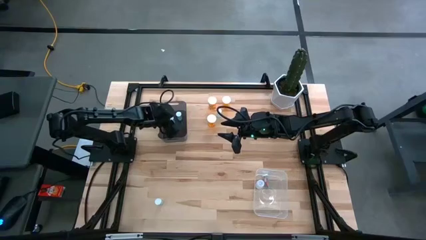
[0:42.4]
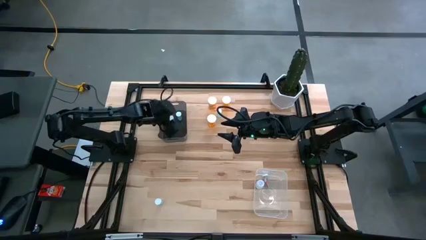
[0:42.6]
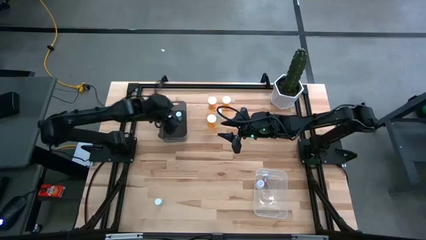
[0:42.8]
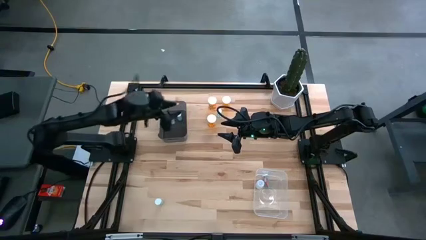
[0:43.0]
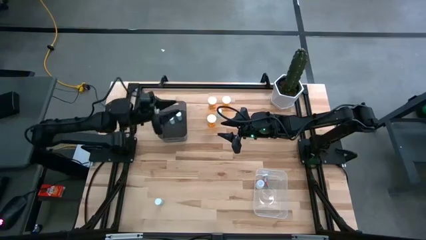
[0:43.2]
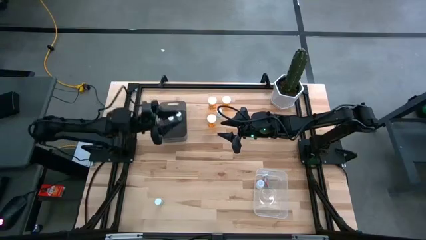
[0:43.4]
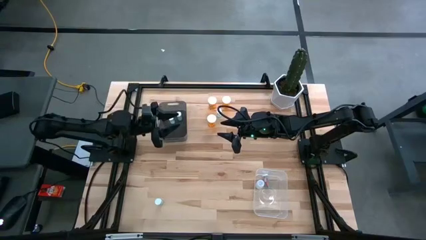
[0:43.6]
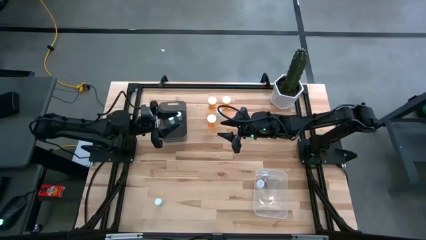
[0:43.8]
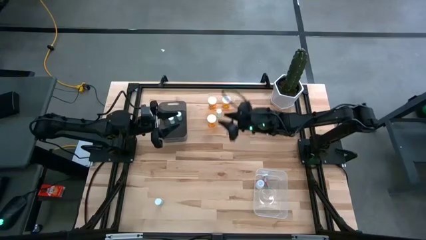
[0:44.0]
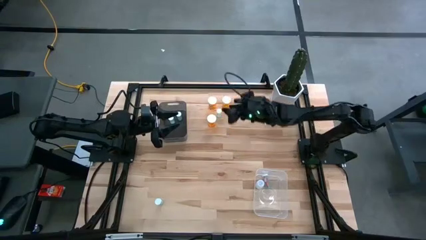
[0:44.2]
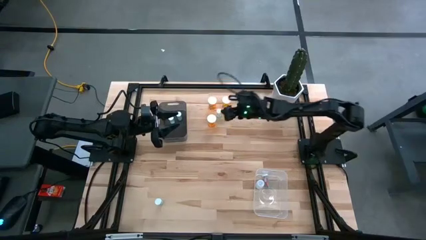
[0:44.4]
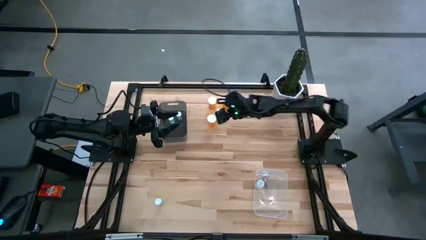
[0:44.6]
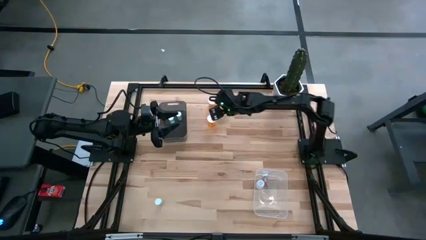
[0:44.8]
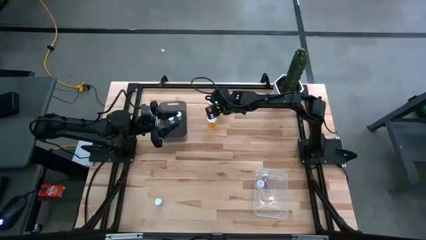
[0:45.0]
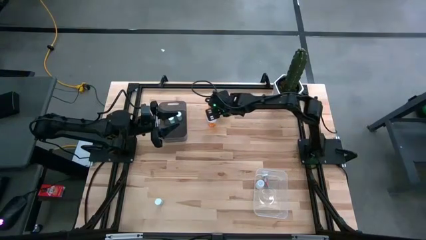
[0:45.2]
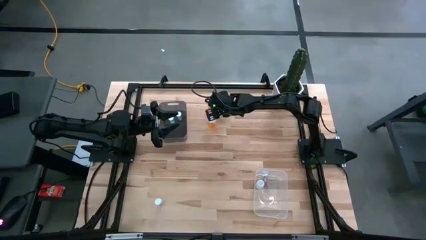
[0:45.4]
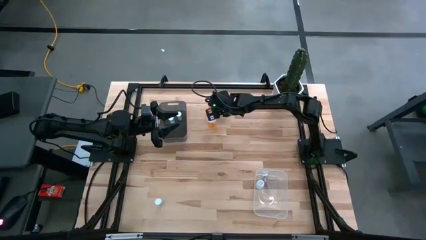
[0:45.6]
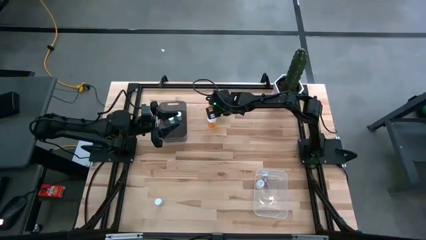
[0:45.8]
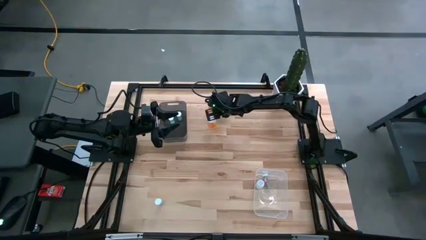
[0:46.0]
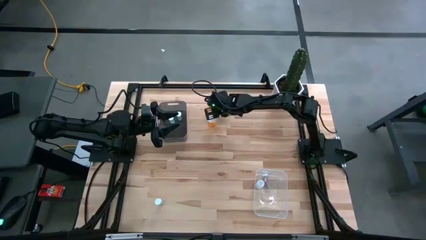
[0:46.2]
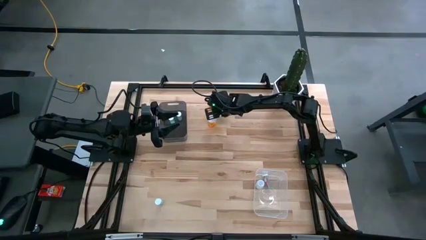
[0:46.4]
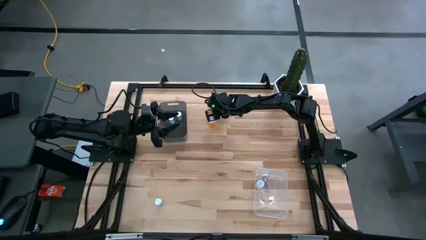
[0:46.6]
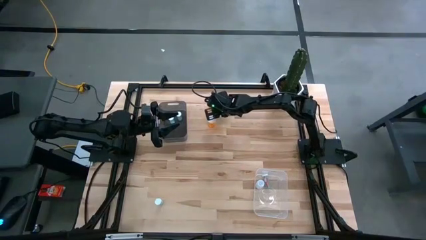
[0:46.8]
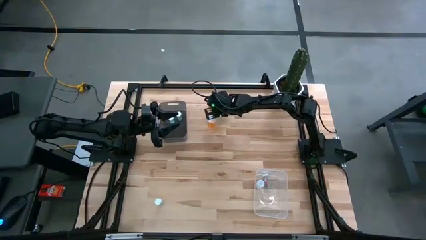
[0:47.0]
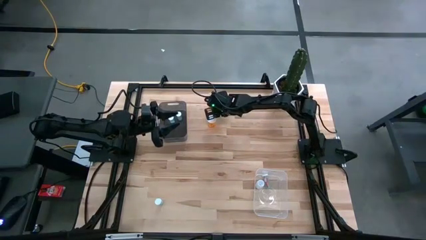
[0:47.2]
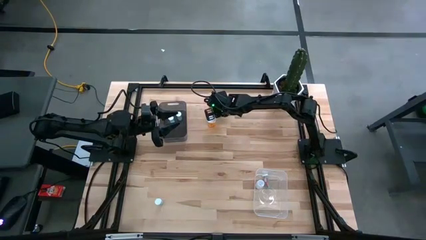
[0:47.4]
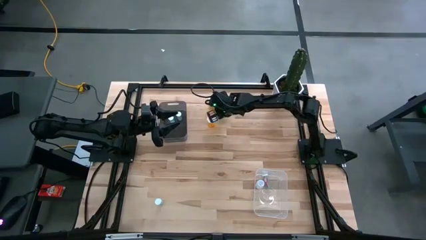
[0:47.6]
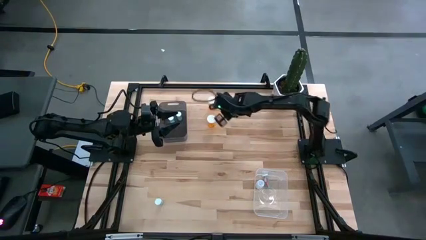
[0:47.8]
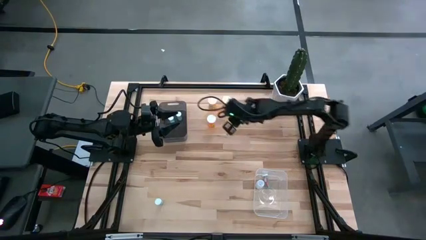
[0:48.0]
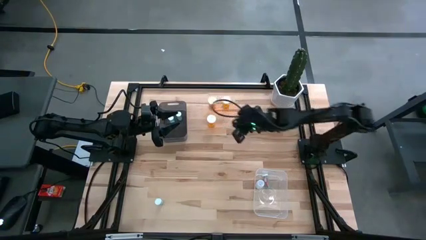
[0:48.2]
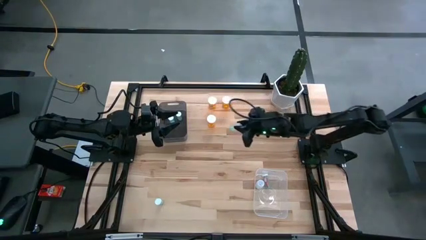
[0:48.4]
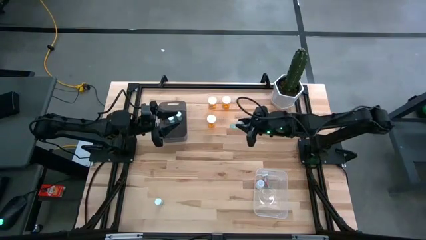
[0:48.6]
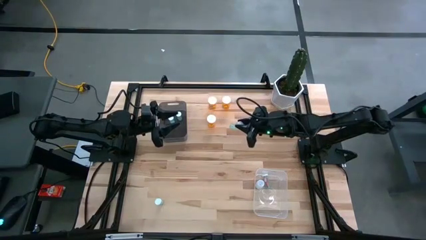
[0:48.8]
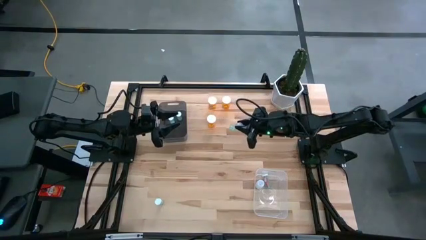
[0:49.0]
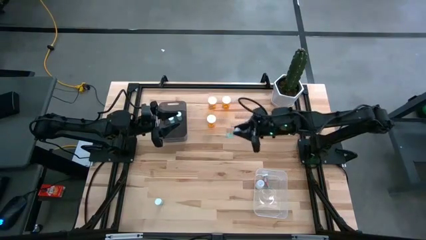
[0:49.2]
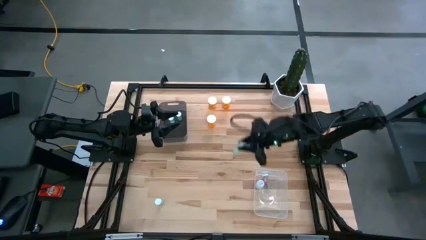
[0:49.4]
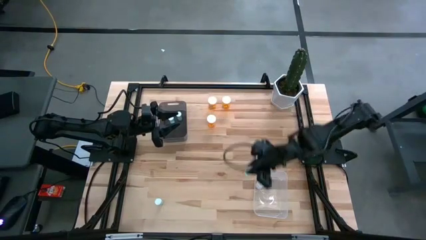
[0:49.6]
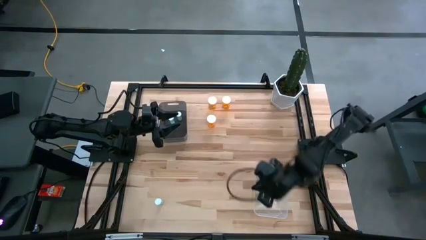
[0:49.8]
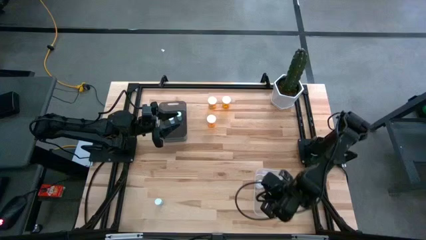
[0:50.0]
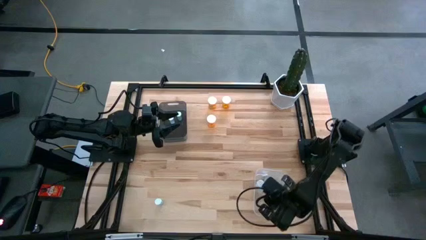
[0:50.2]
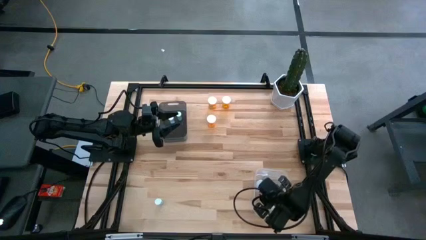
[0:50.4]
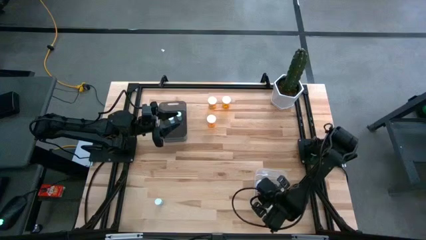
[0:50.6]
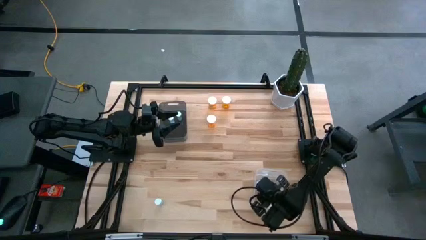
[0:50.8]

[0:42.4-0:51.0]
Task: Pick and place medicine bottles into bin by pill shape (circle, oval)
Put the small blue medicine bottle into the transparent bin
